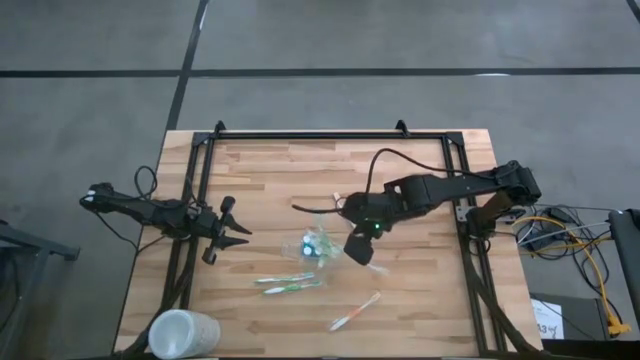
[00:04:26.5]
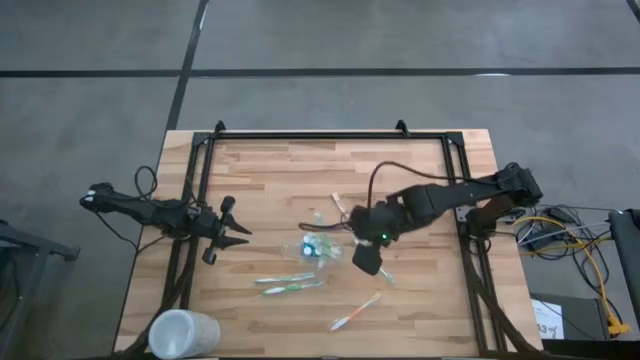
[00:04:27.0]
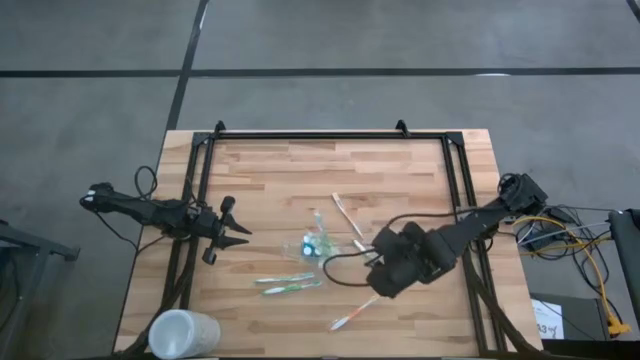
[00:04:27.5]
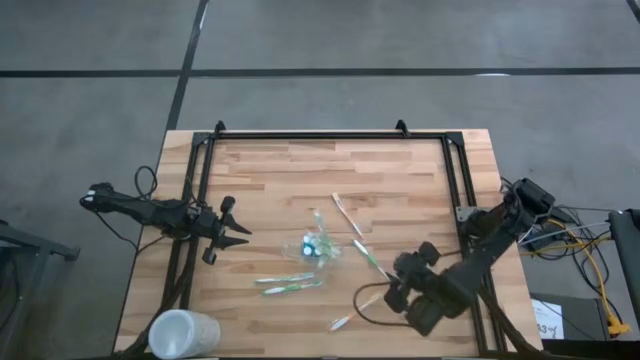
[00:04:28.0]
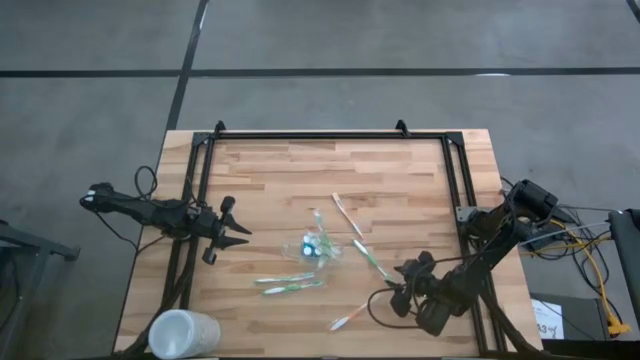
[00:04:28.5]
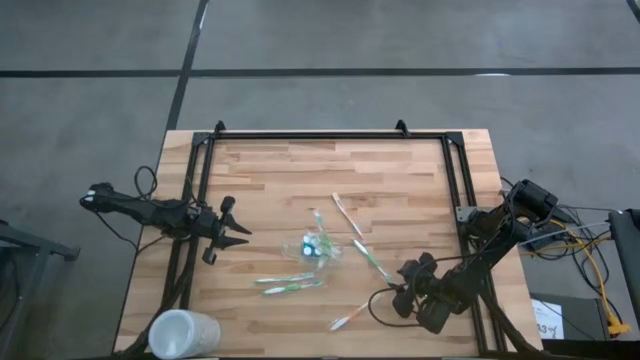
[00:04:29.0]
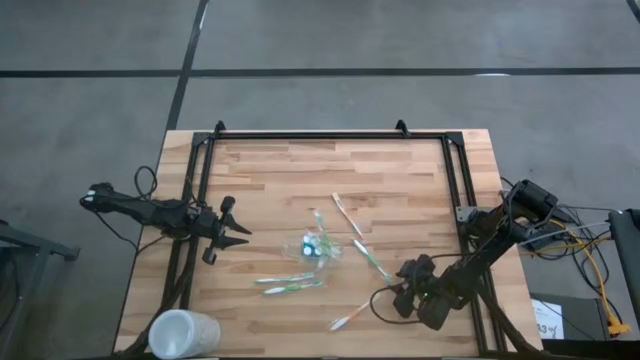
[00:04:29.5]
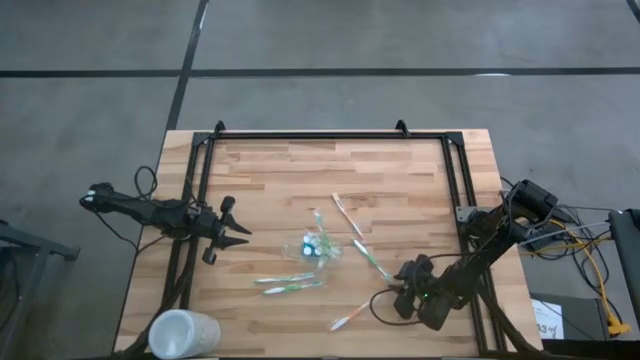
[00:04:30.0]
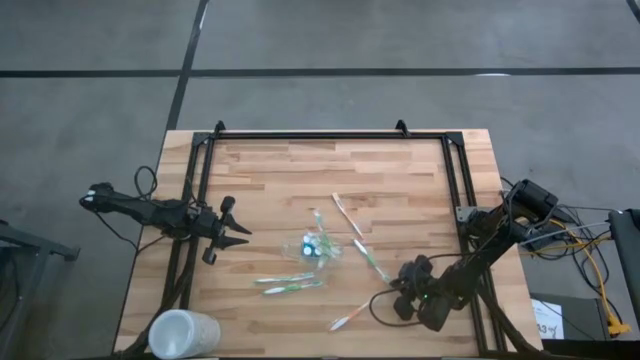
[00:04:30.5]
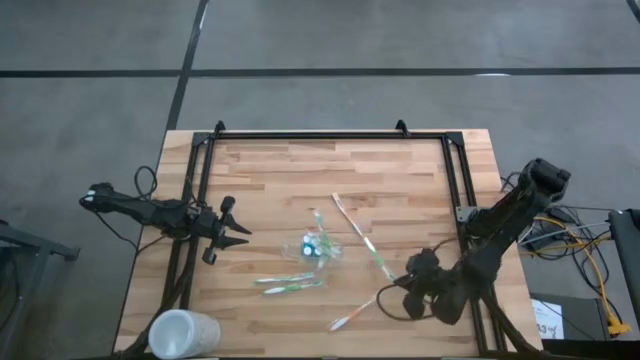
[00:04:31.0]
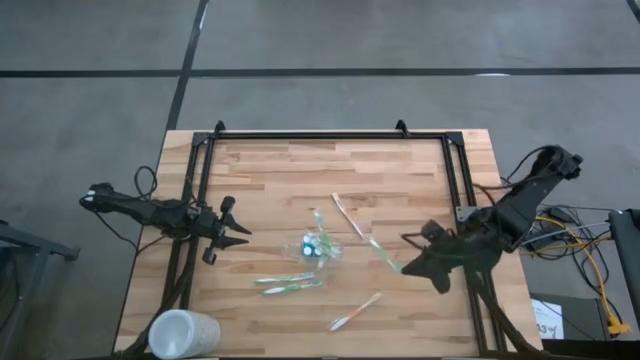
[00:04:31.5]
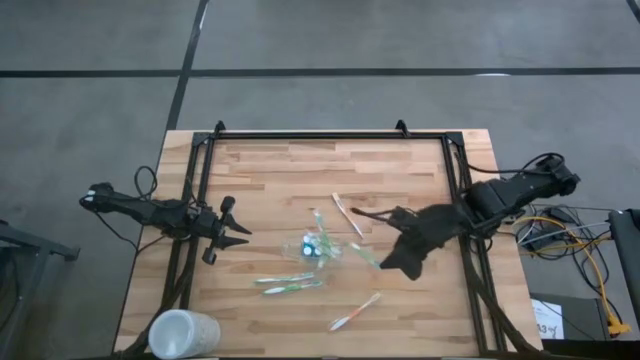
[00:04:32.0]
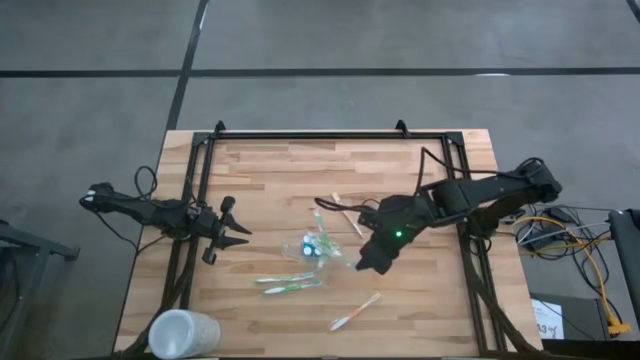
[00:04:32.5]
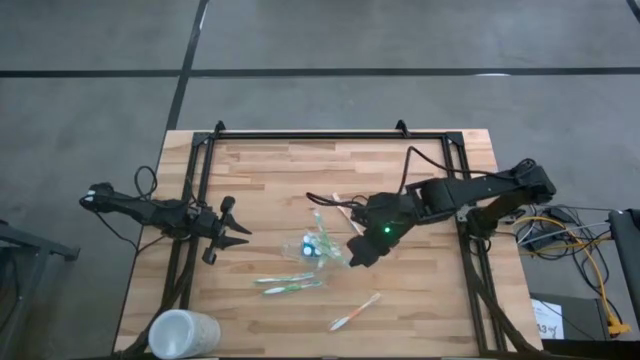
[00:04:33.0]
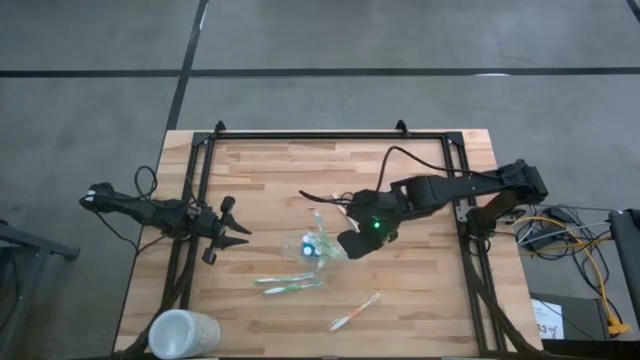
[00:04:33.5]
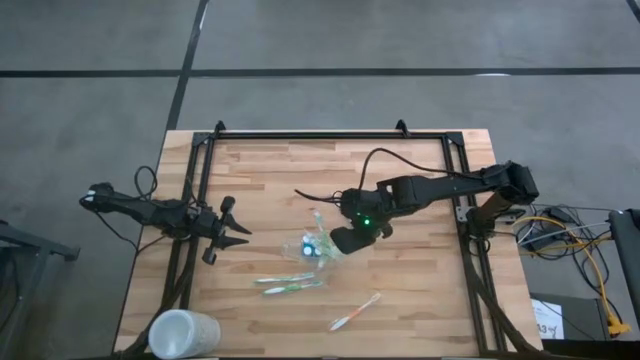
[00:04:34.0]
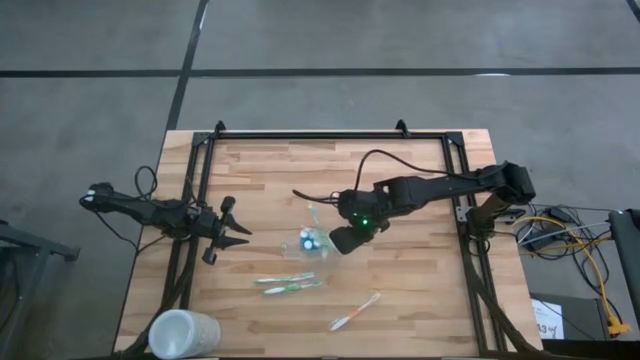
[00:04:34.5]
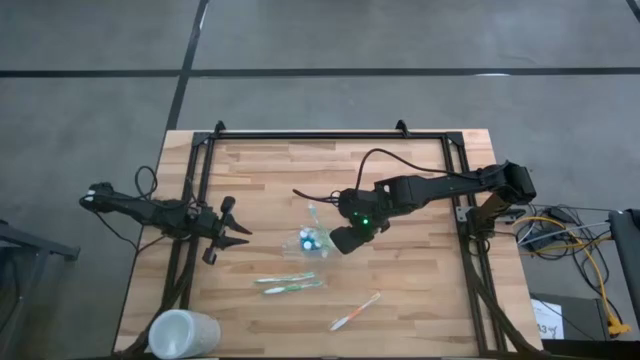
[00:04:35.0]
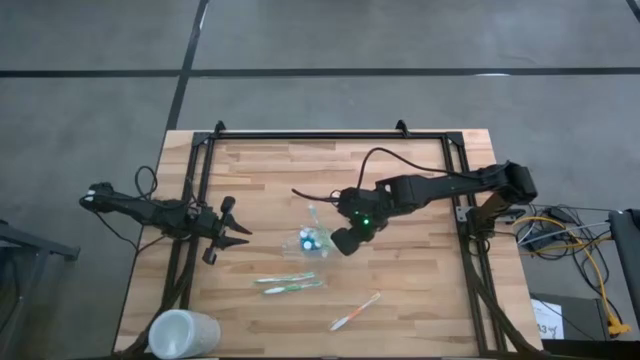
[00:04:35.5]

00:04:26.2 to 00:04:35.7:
Task: Pick & Place toothbrushing station
Put the green toothbrush into the transparent organizer

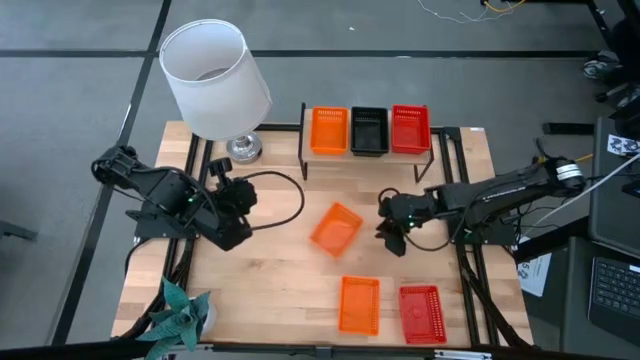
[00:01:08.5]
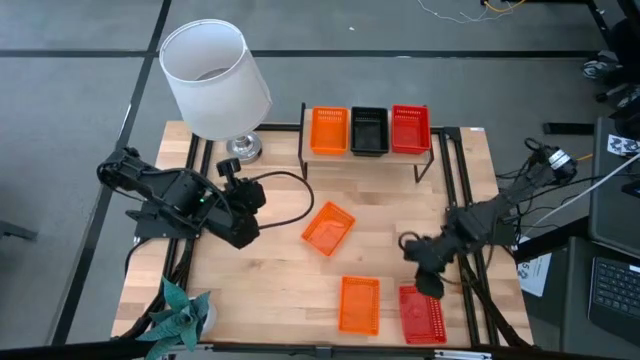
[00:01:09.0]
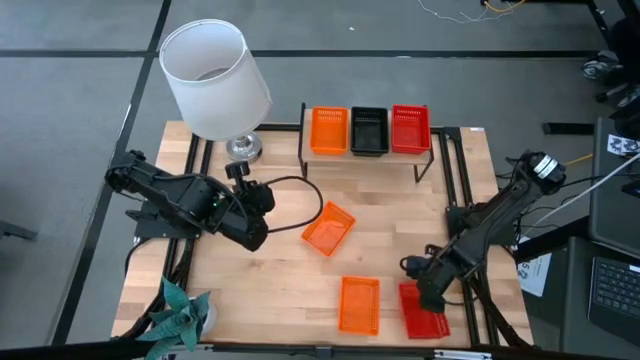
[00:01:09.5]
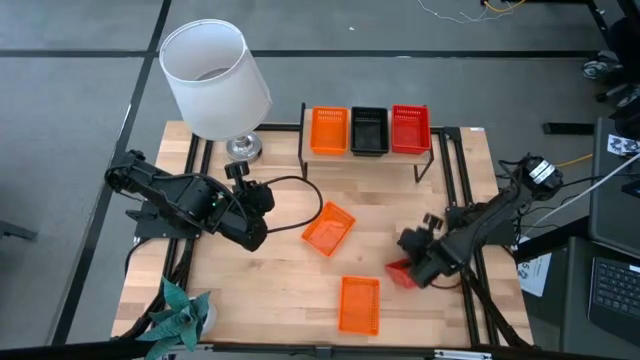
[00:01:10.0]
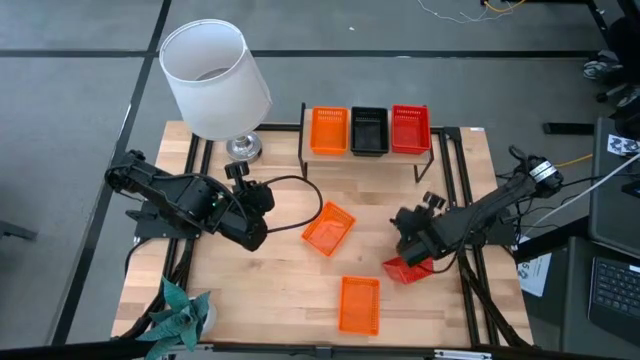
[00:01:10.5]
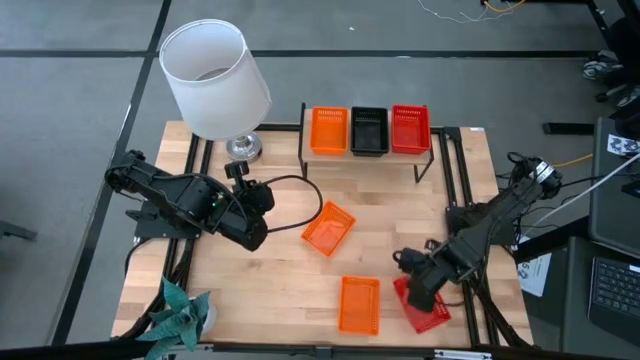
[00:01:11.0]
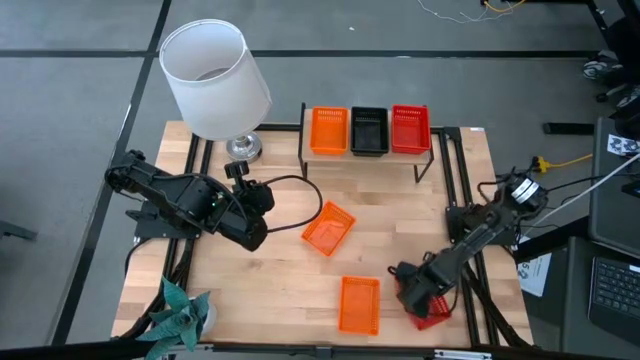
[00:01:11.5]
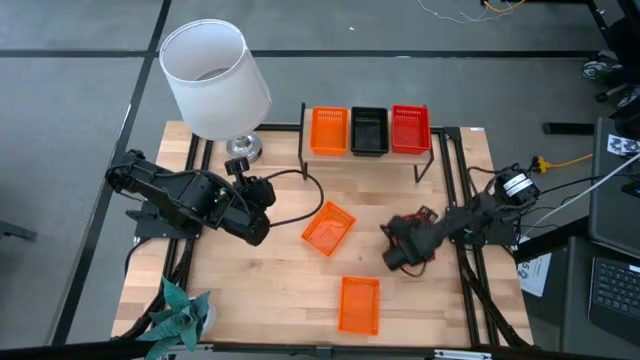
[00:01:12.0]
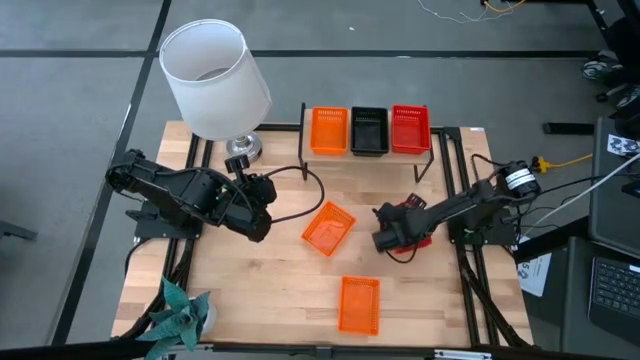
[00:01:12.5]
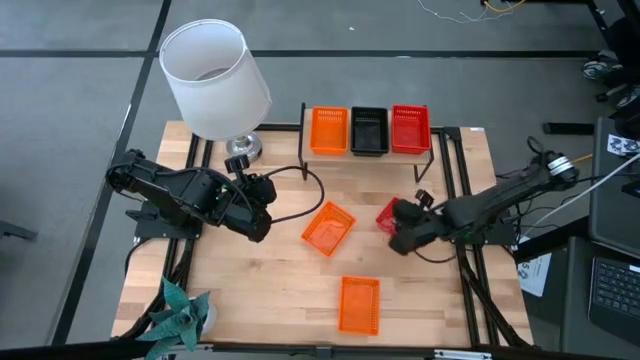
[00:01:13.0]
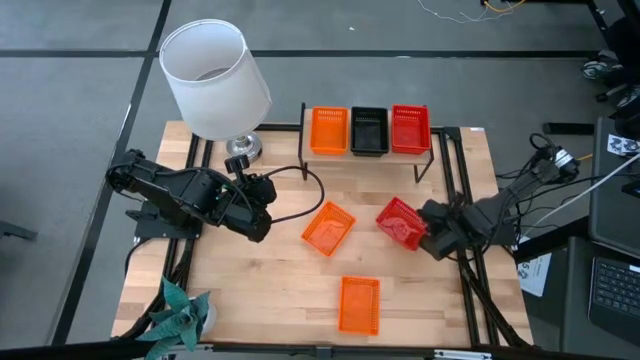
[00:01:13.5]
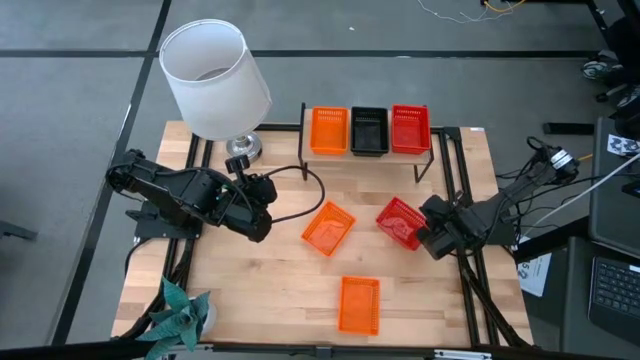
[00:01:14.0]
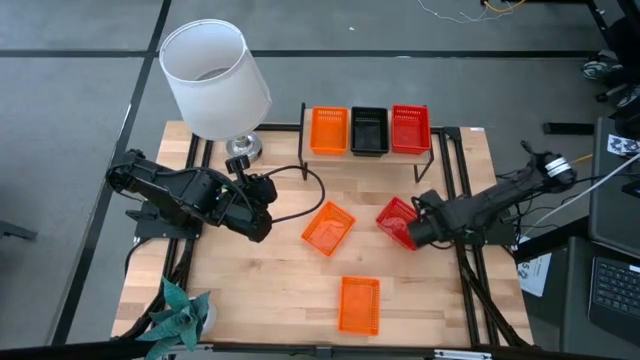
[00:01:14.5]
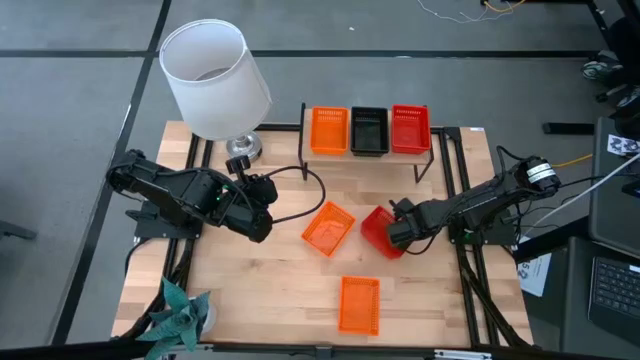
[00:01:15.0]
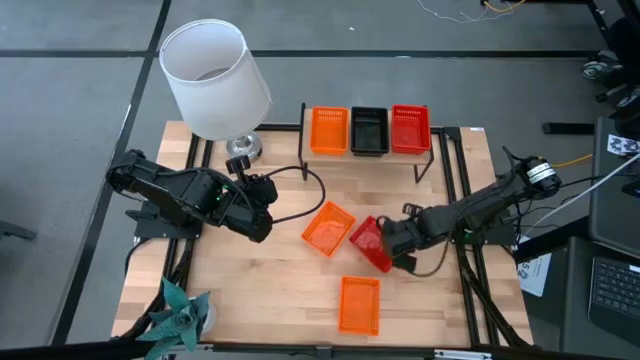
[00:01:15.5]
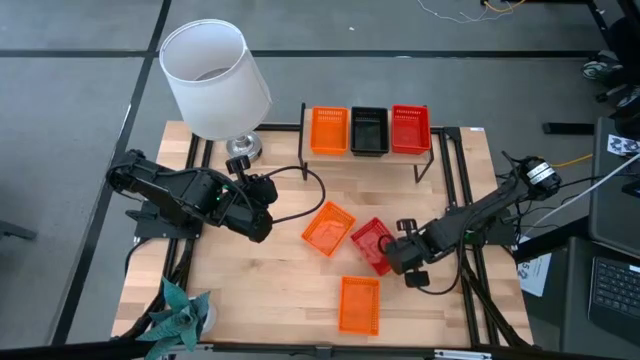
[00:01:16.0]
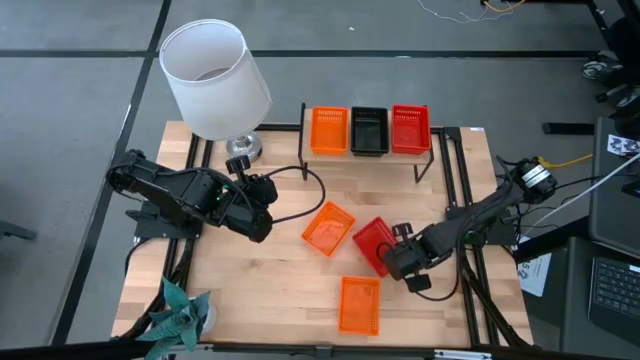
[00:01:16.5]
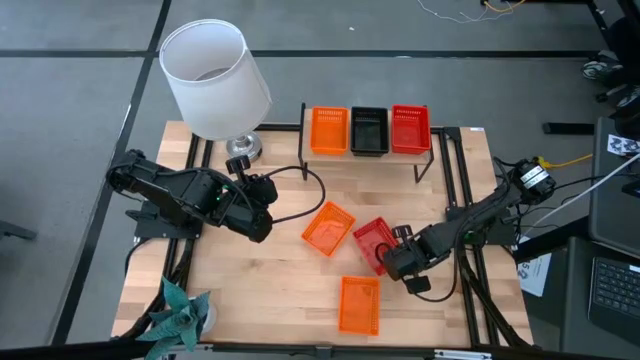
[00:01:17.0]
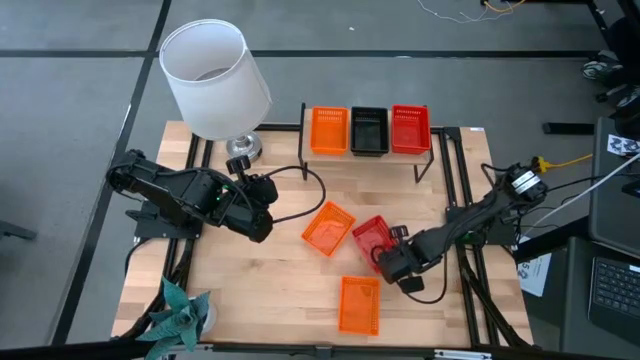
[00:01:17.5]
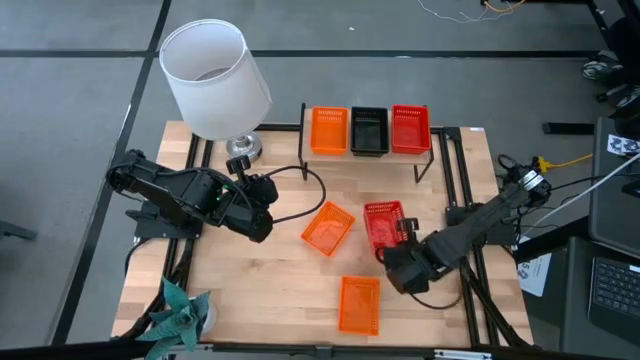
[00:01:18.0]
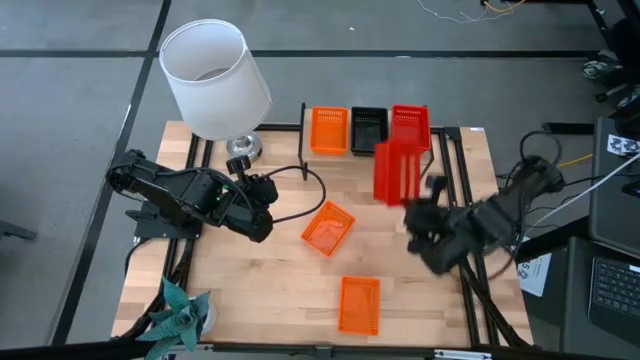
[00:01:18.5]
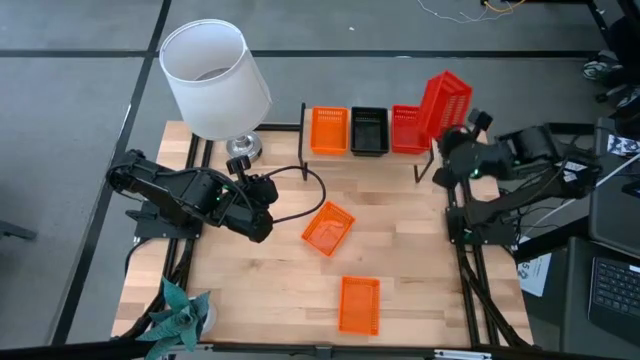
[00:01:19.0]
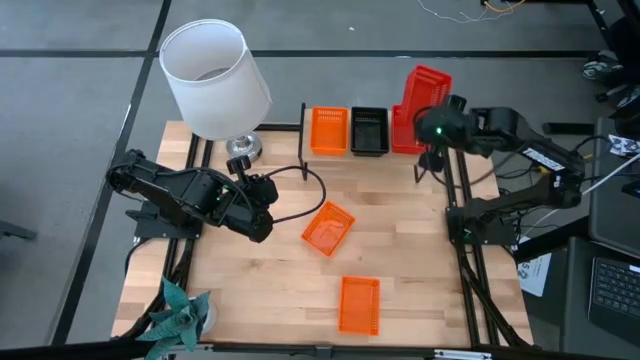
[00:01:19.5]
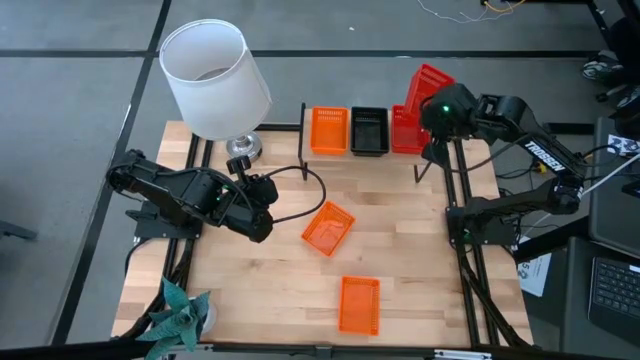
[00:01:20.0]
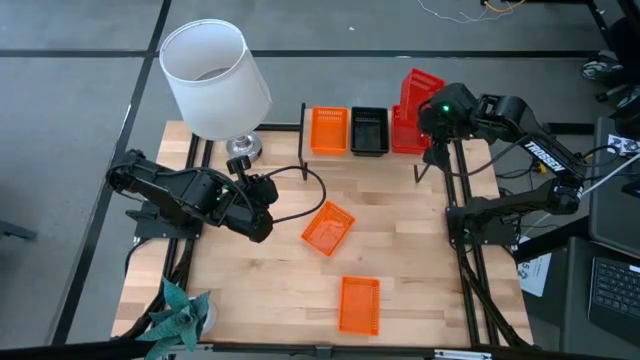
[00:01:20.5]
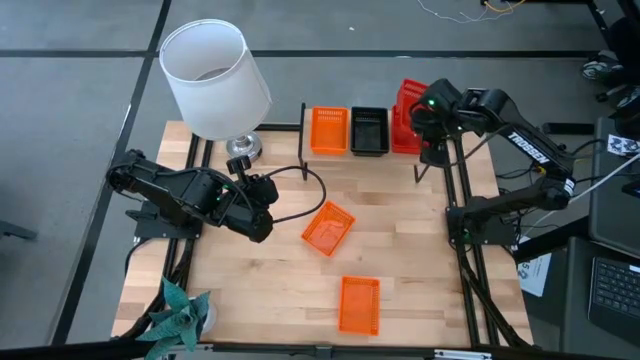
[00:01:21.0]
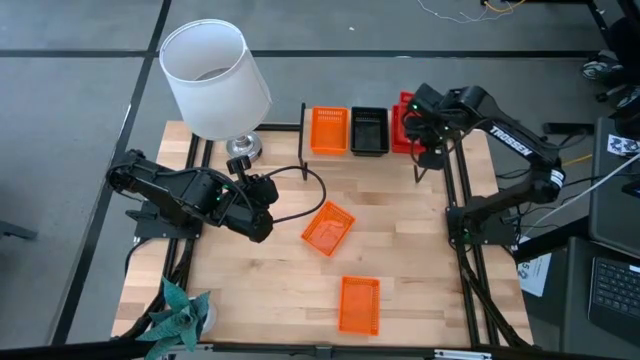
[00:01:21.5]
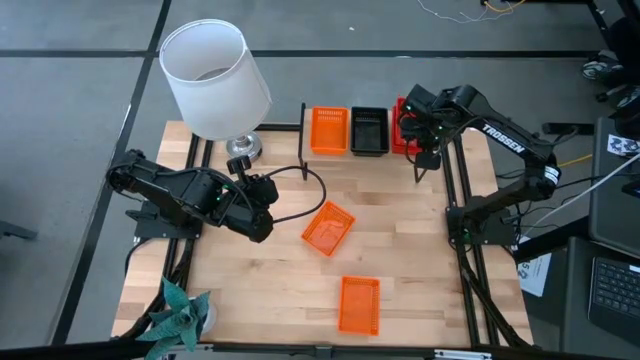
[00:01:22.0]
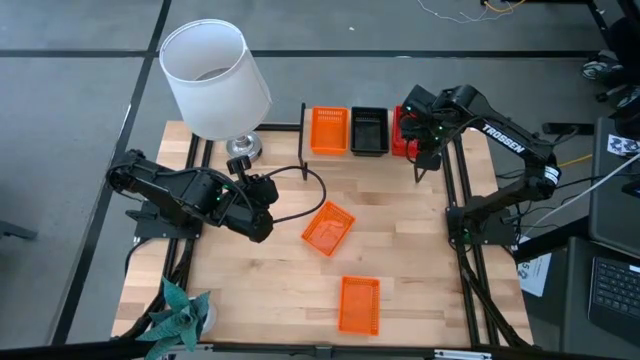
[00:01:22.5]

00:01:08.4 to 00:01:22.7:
Task: Stack baskets on shelf by color
Stack the red bin on the red bin on the shelf
